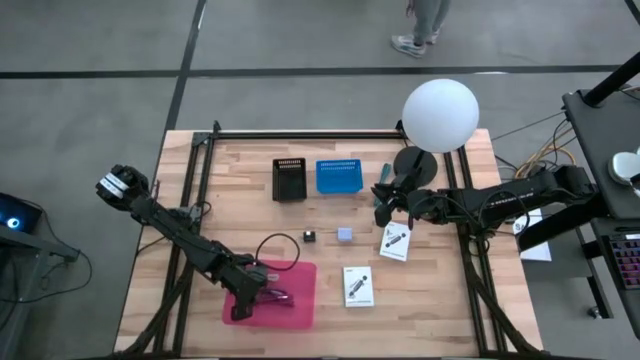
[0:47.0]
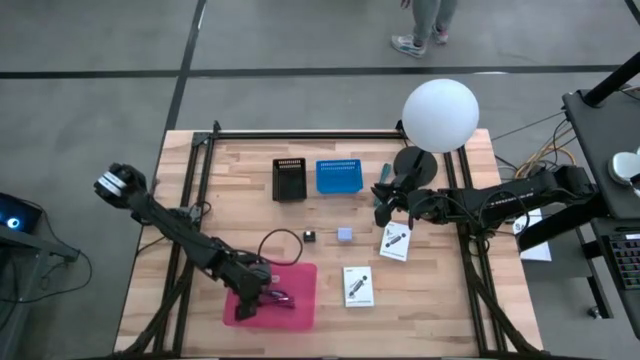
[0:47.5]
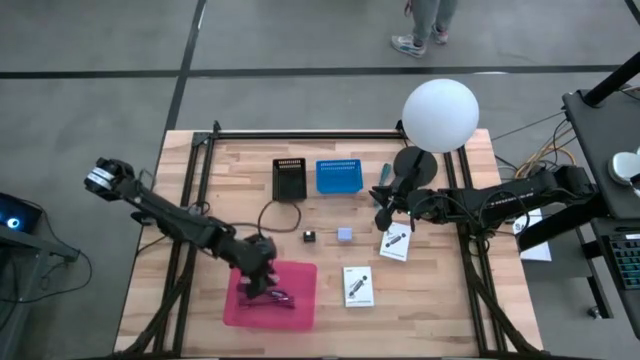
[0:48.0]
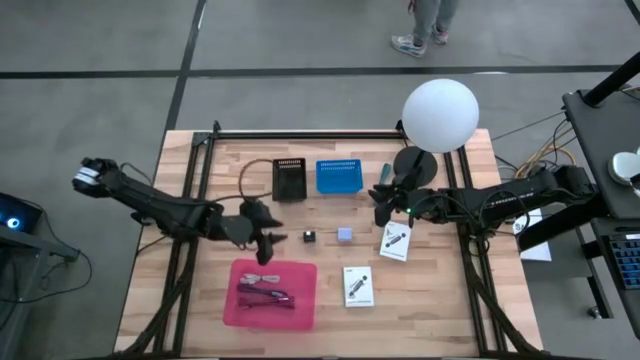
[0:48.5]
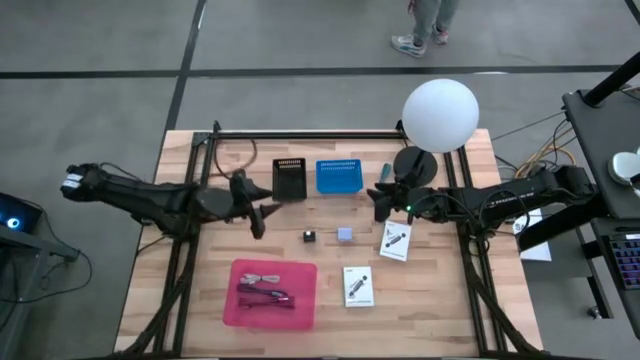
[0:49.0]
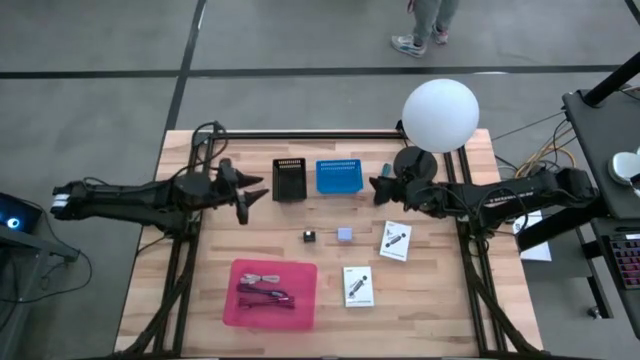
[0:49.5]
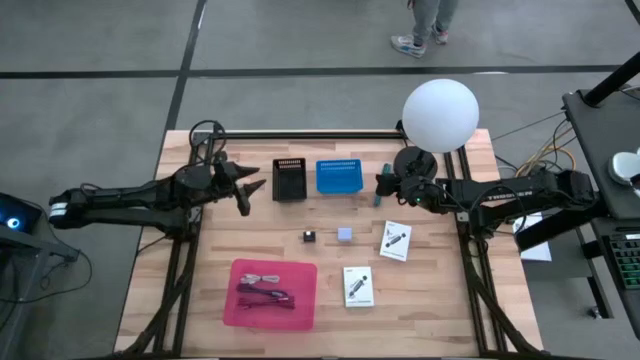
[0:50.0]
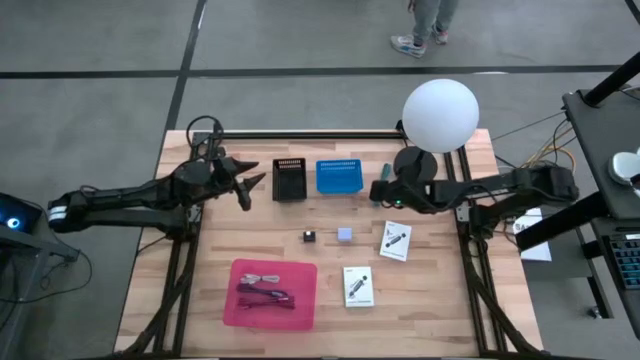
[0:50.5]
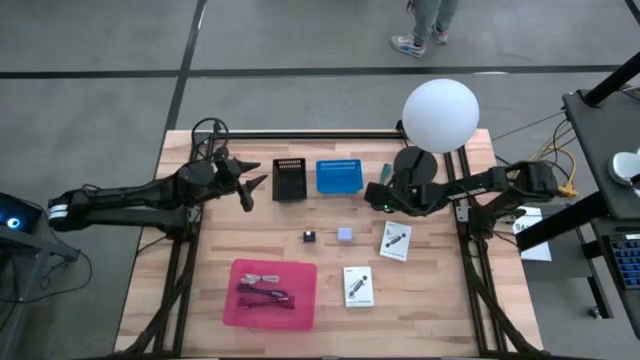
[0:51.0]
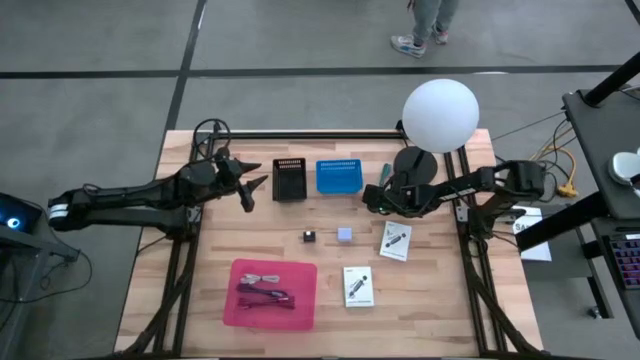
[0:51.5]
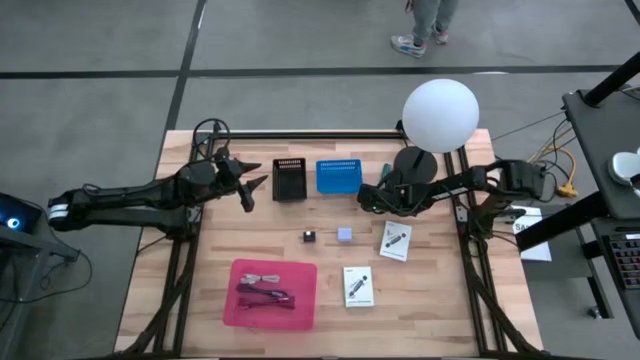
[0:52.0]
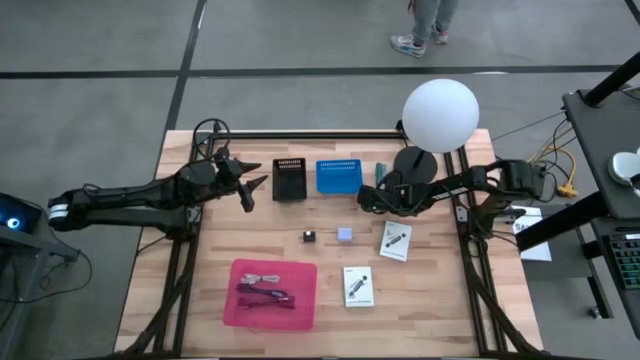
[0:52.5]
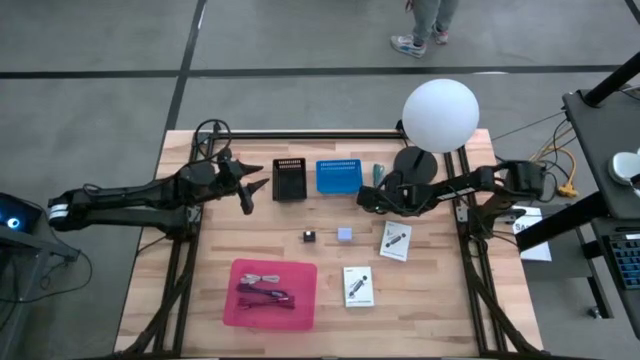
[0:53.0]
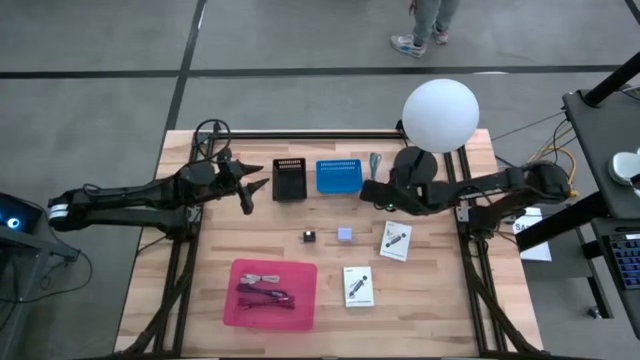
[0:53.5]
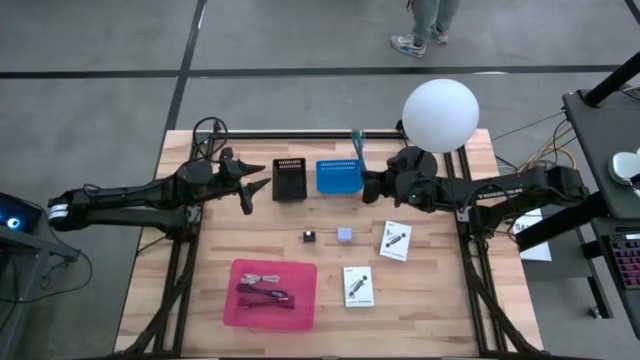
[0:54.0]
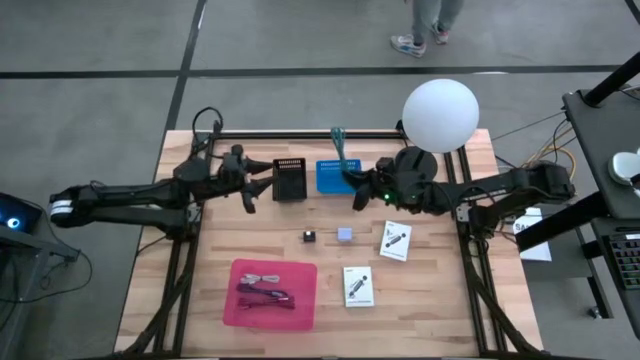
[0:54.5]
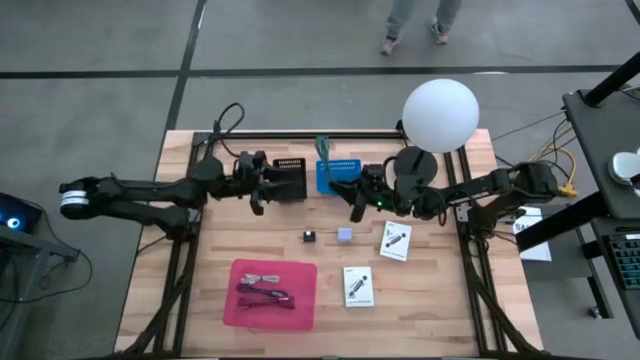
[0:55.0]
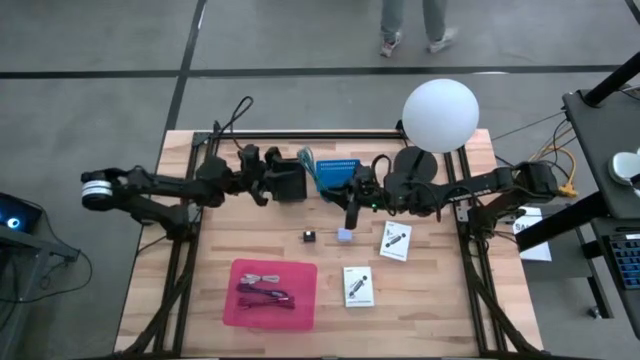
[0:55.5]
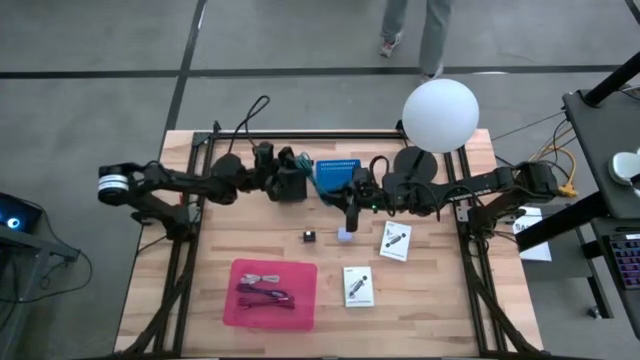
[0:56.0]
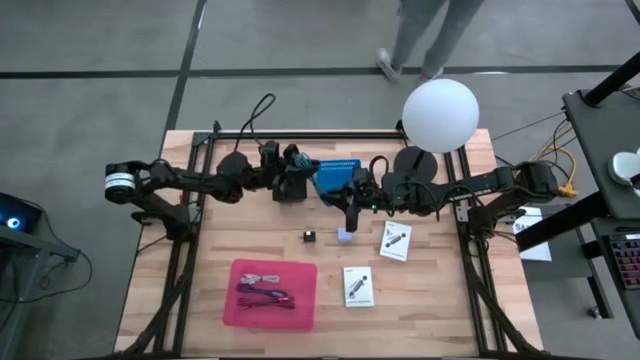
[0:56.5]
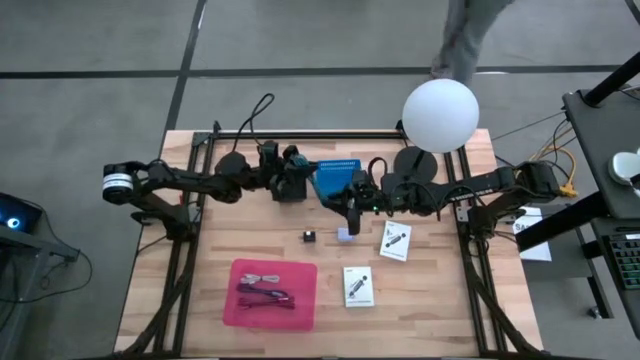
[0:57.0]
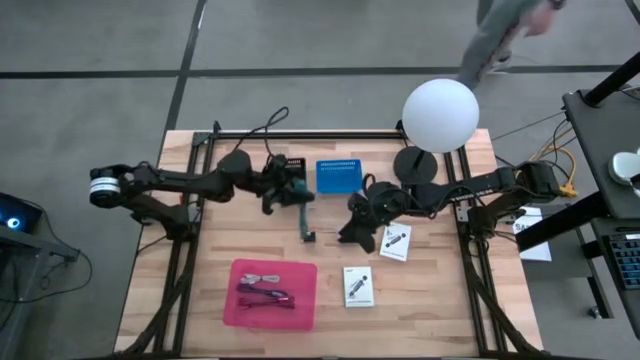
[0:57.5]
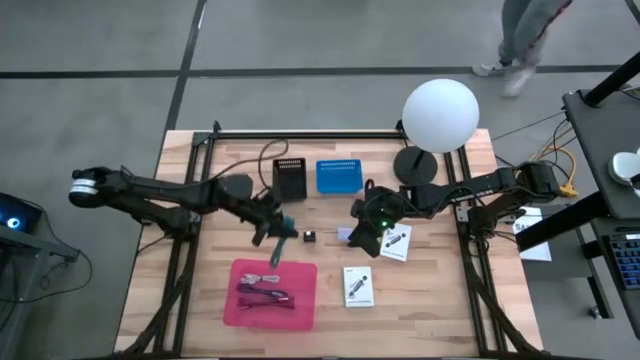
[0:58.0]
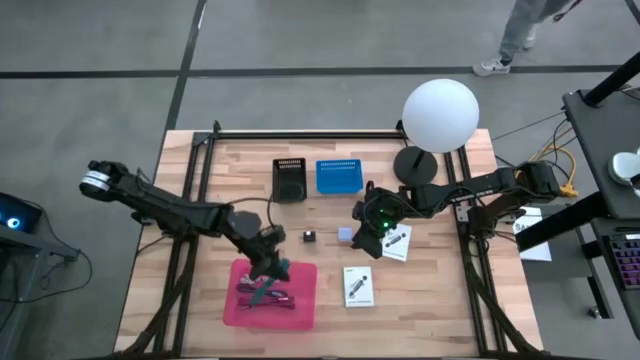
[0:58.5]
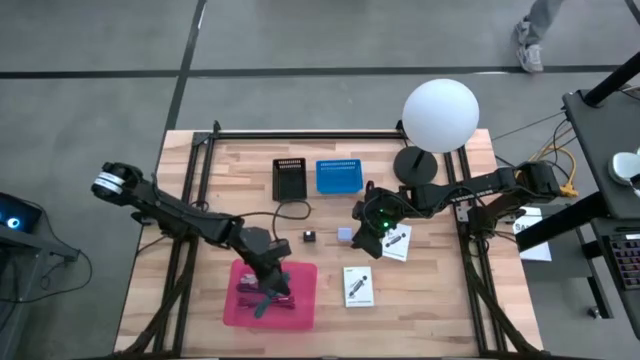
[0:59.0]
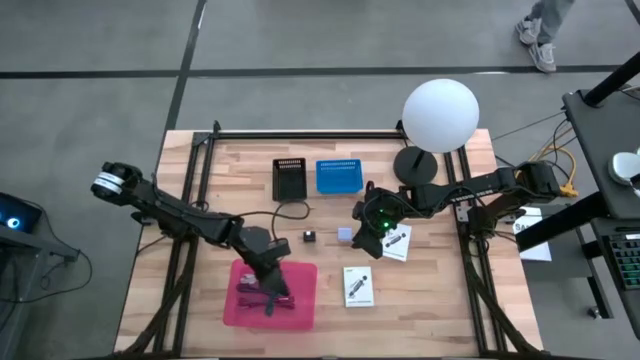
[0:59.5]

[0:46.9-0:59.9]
Task: Pick and place items into bin
Put the light blue charger cable into the pink bin

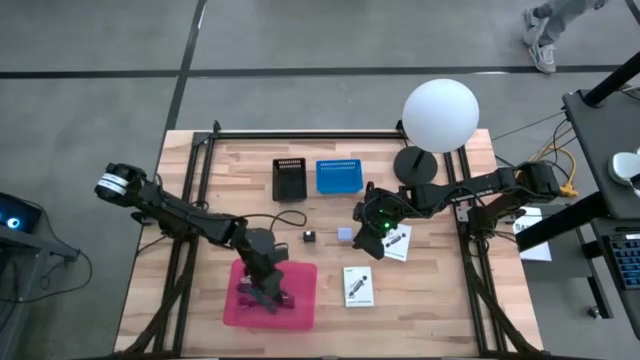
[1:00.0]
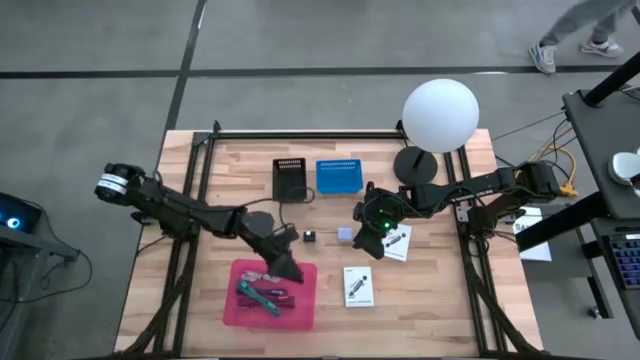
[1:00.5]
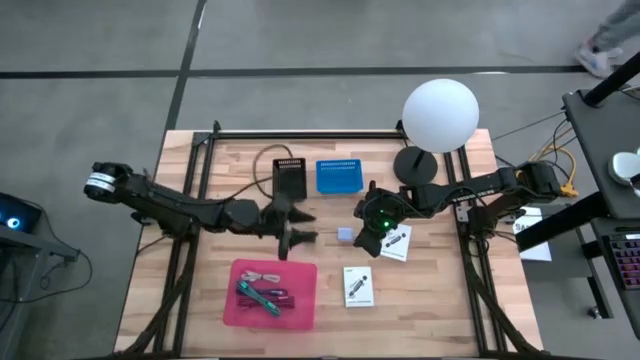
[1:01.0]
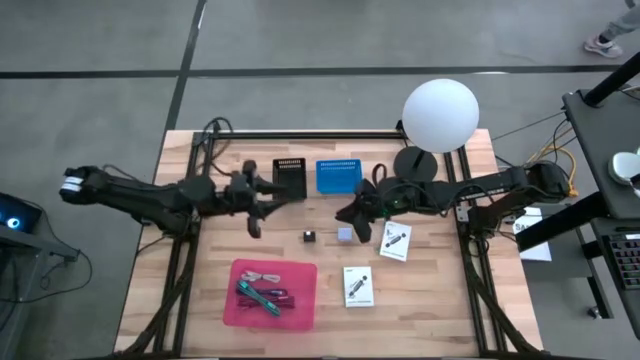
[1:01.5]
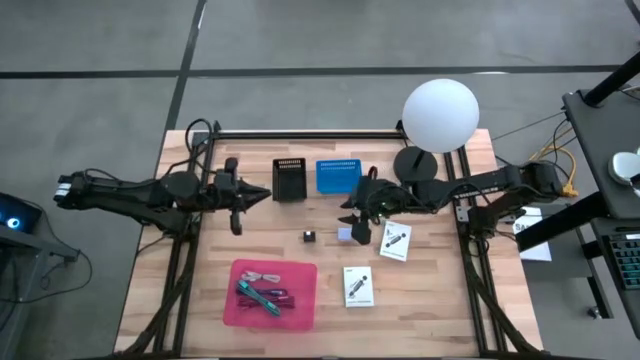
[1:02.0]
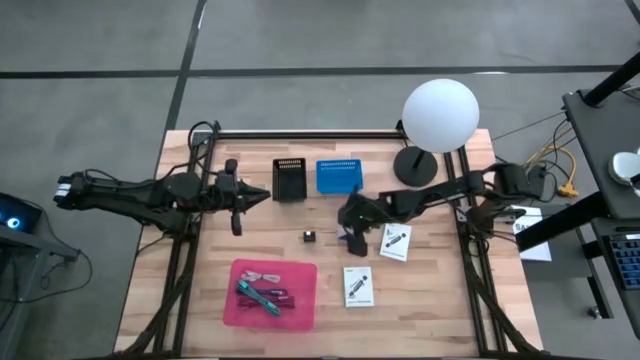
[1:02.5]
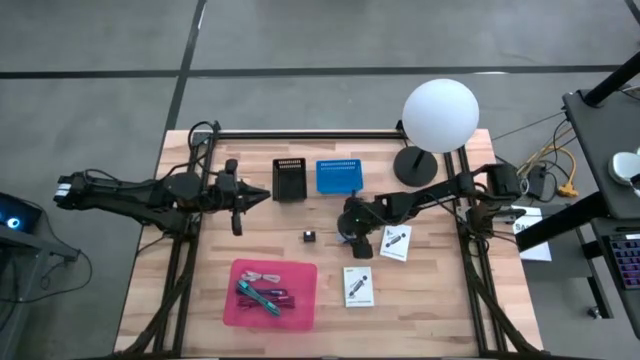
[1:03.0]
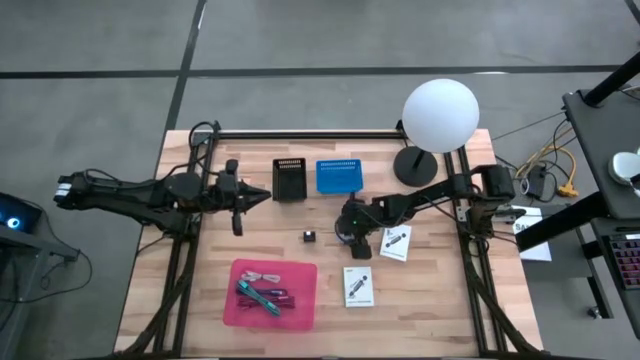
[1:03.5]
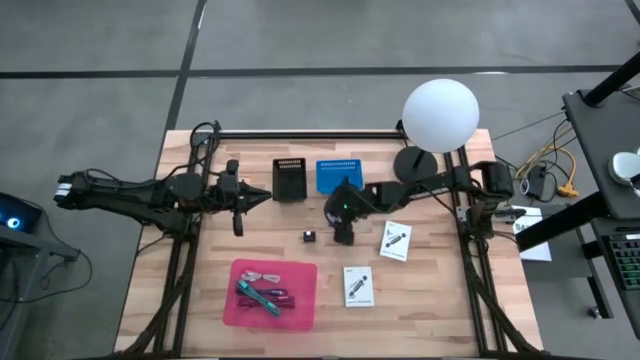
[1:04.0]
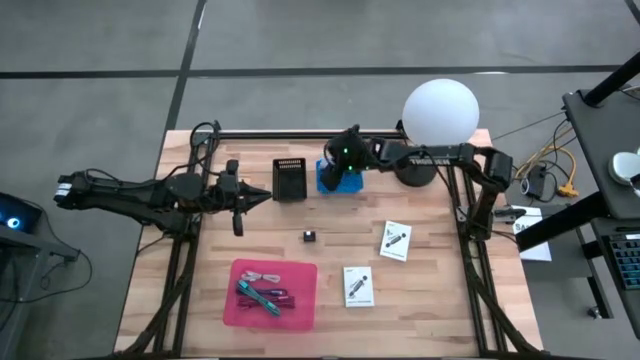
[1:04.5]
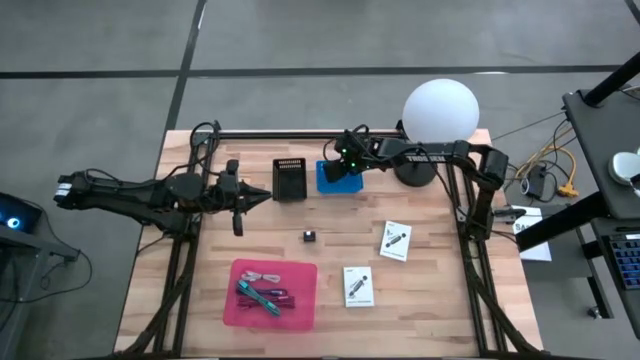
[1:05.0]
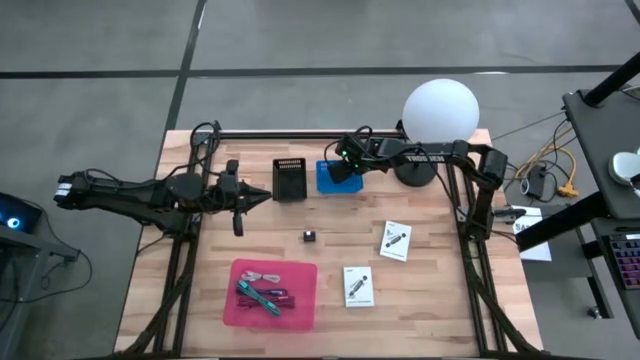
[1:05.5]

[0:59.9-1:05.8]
Put the light blue charger adapter into the blue basket

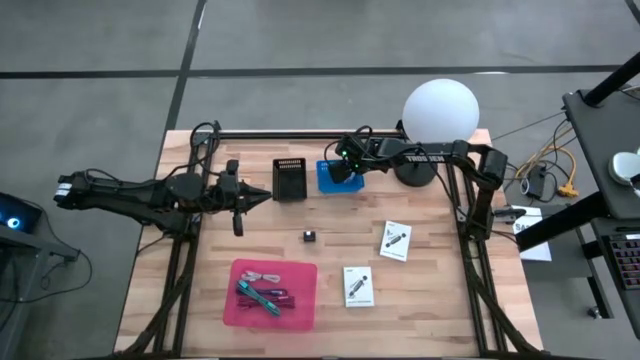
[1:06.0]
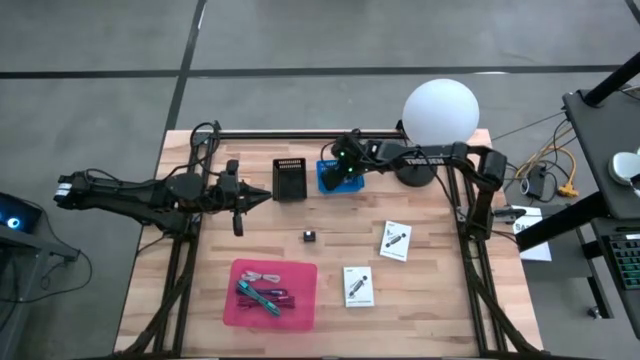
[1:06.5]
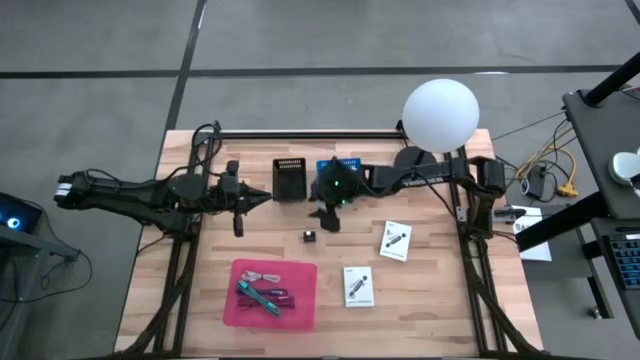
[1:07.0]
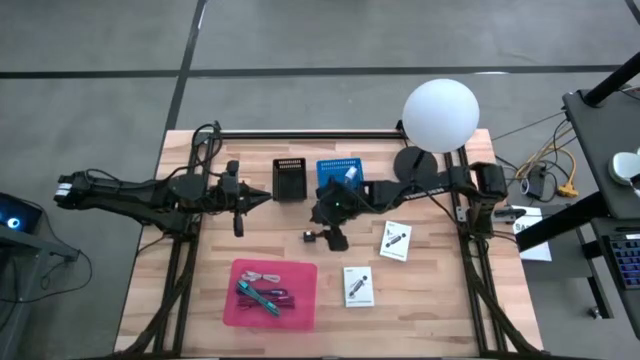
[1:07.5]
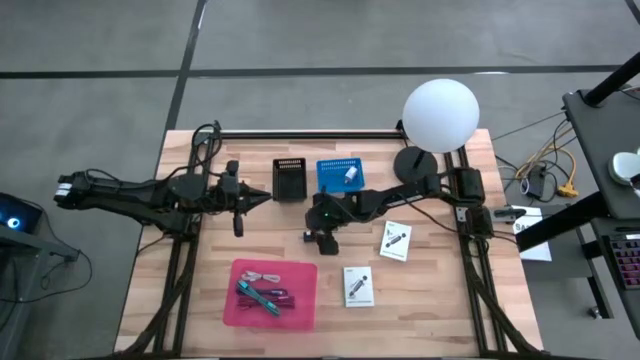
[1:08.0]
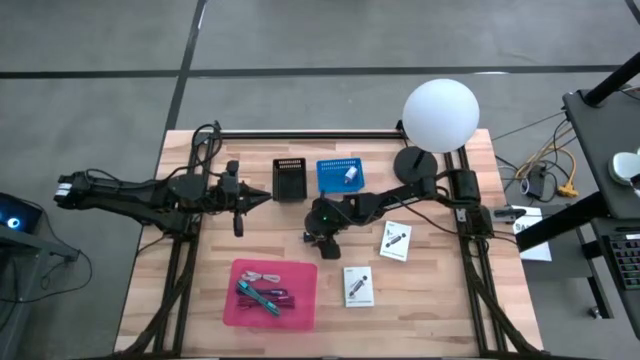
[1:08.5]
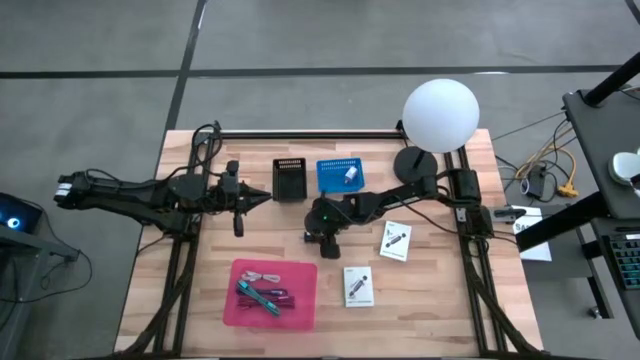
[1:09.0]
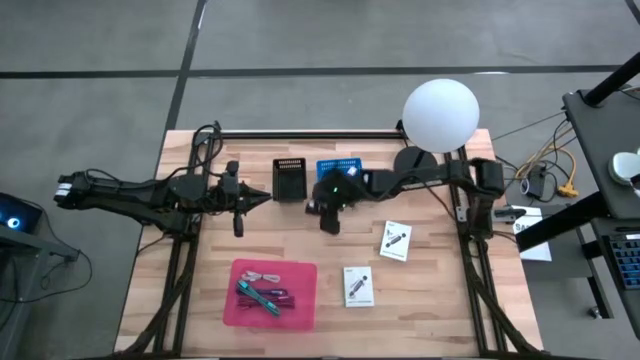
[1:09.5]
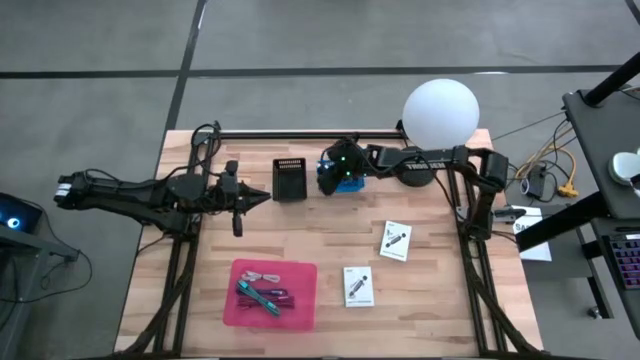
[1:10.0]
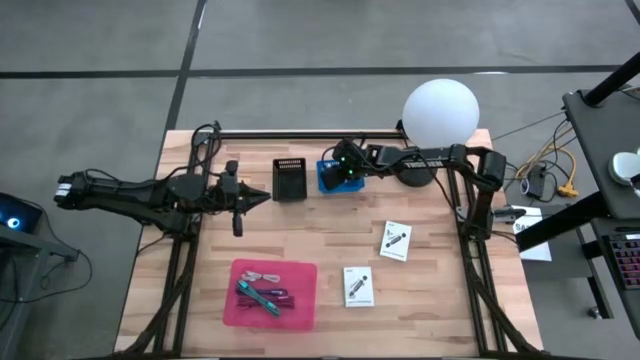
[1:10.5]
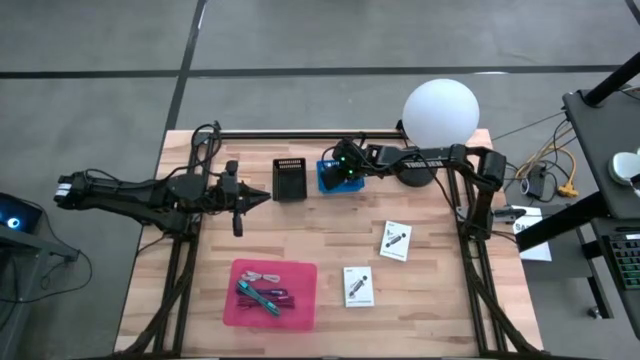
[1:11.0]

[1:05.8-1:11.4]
Put the black charger adapter into the blue basket
